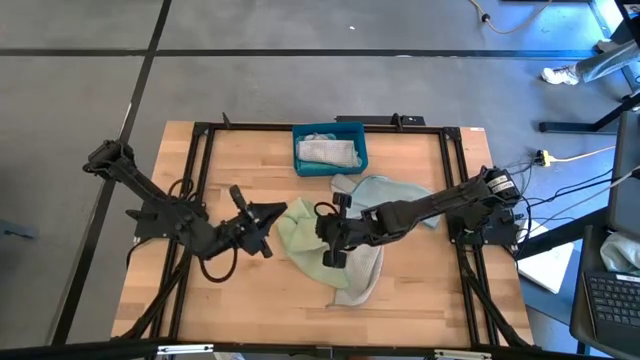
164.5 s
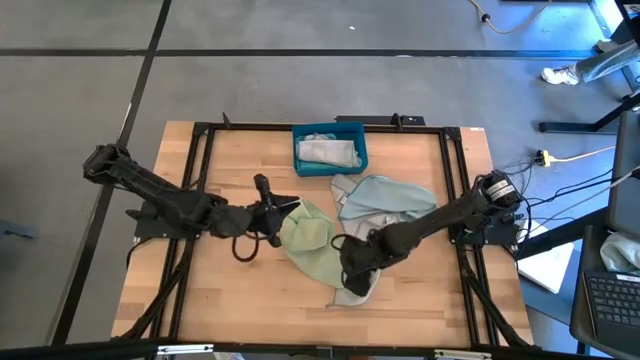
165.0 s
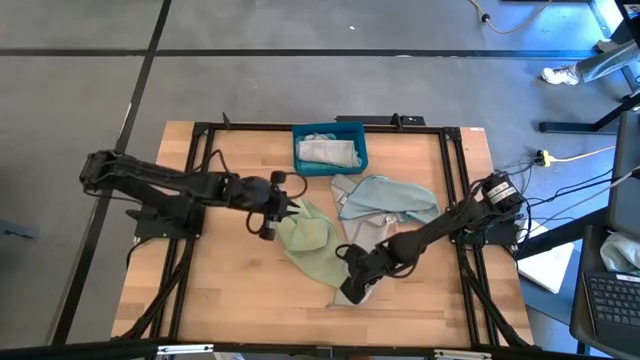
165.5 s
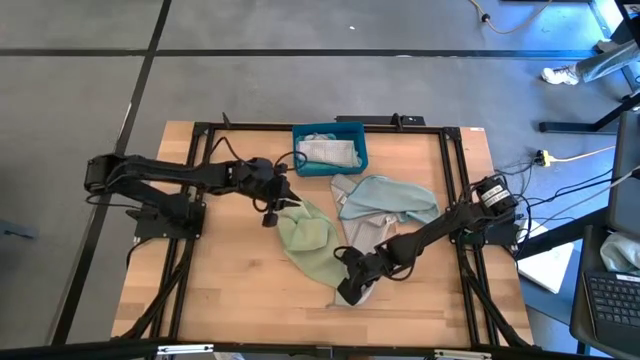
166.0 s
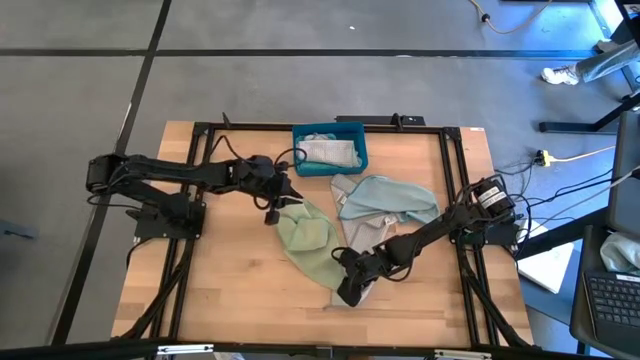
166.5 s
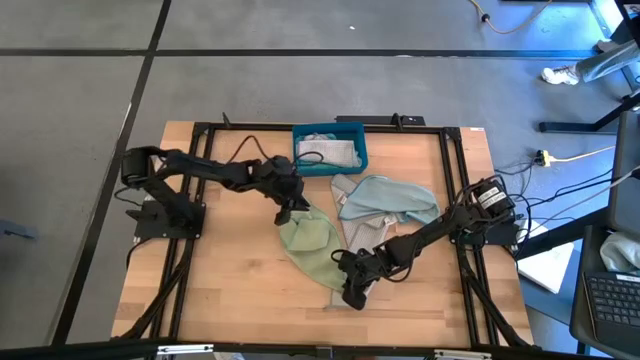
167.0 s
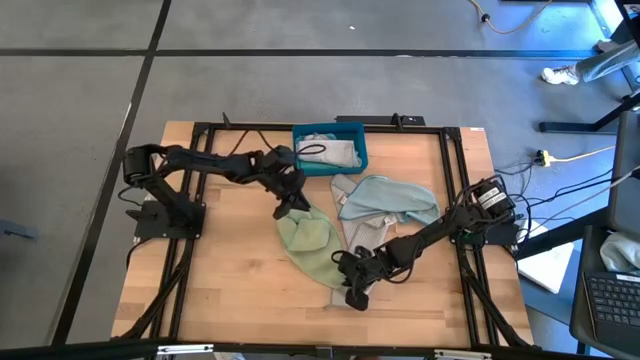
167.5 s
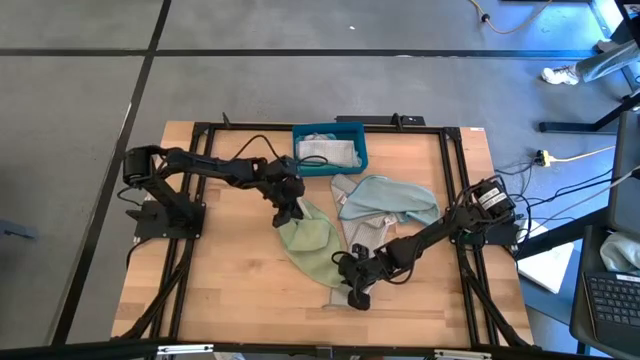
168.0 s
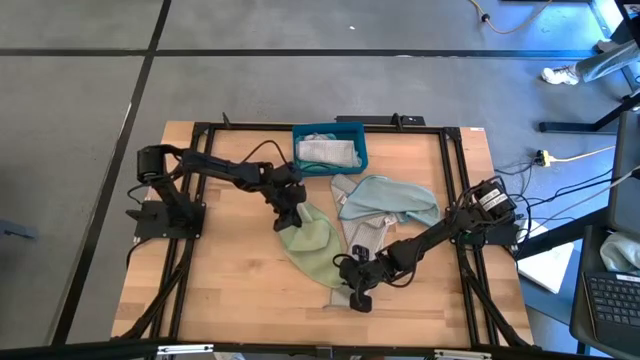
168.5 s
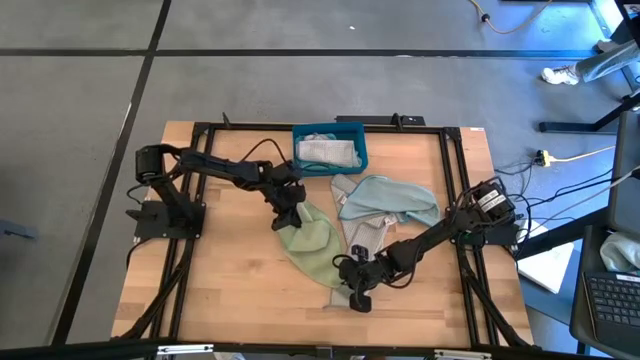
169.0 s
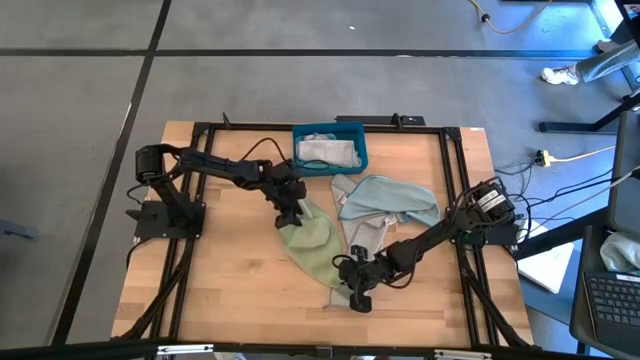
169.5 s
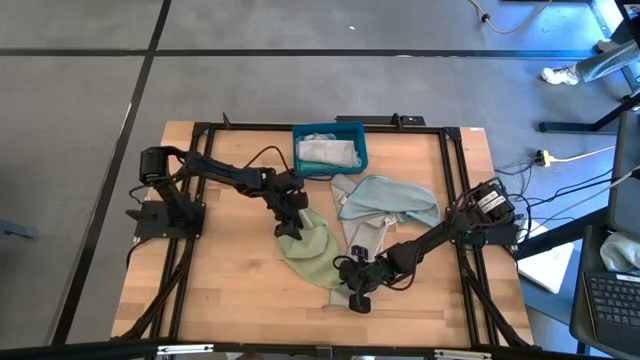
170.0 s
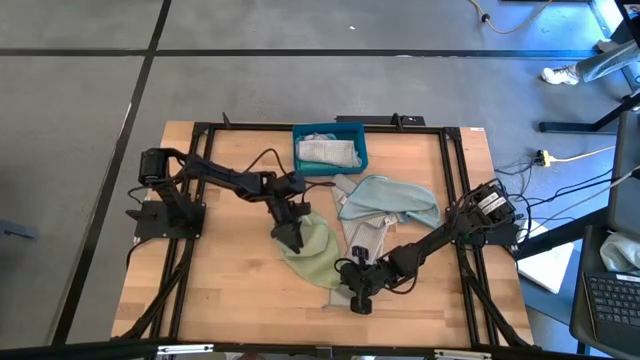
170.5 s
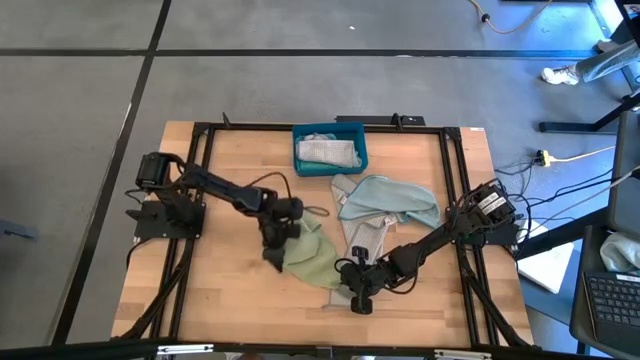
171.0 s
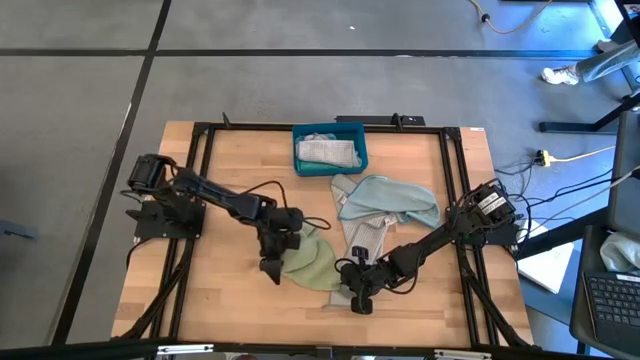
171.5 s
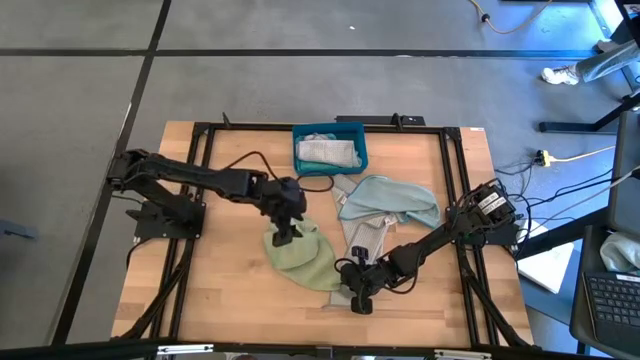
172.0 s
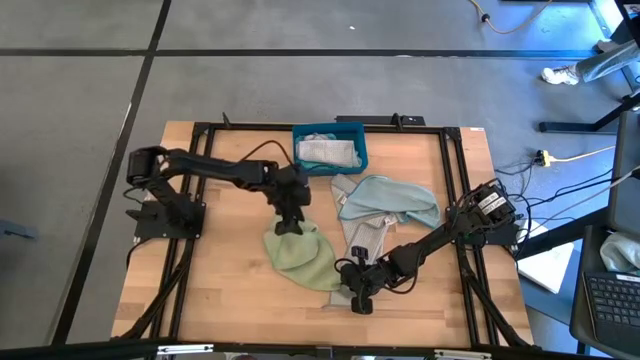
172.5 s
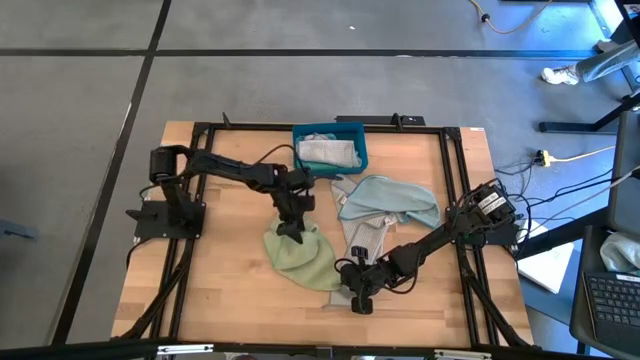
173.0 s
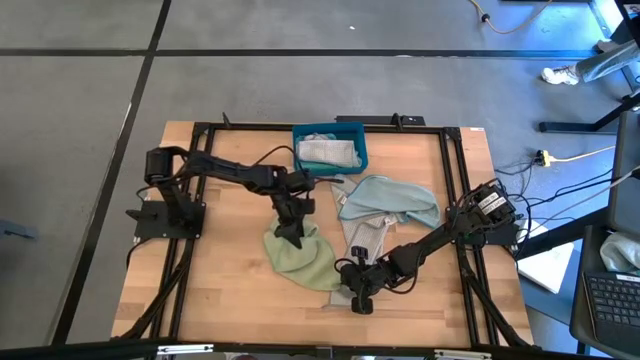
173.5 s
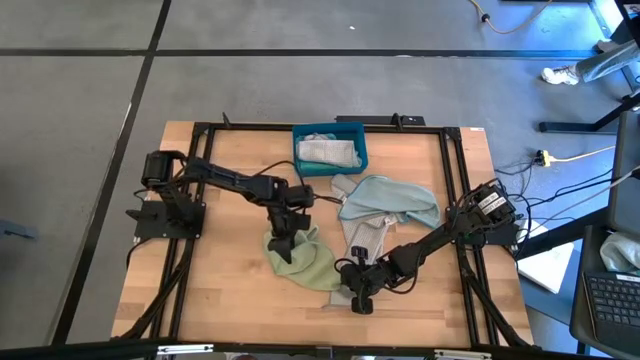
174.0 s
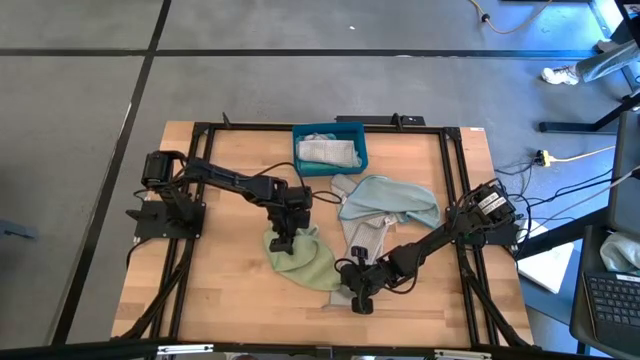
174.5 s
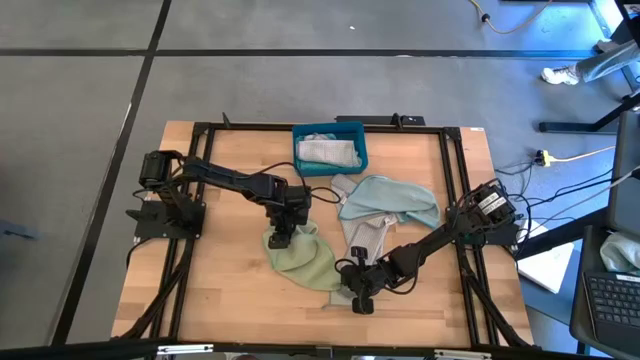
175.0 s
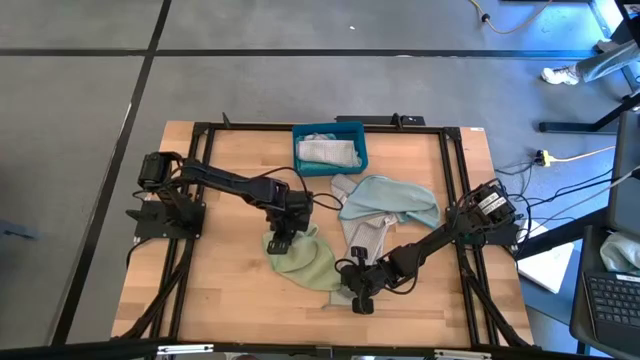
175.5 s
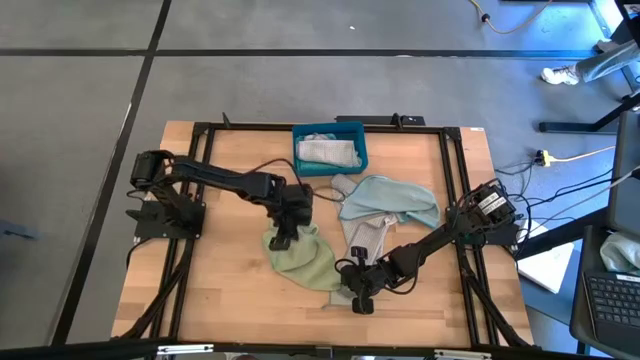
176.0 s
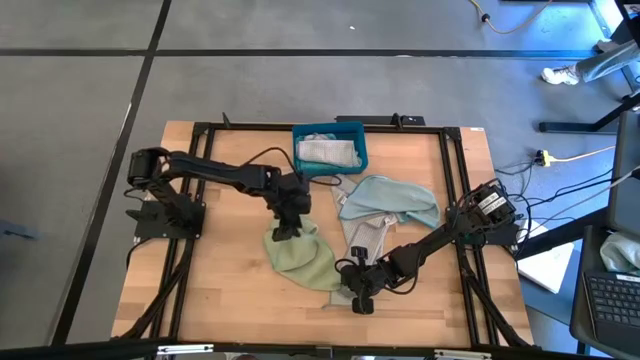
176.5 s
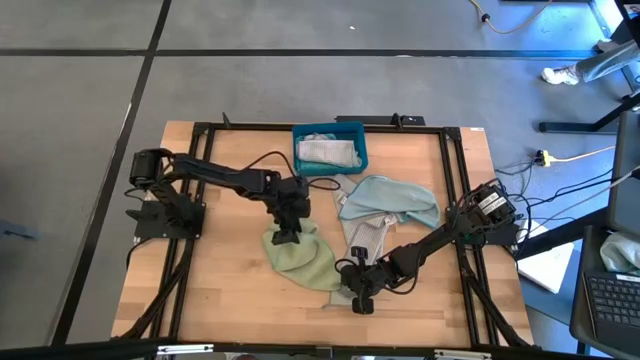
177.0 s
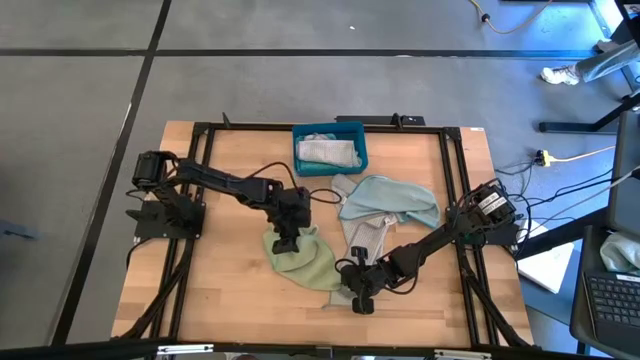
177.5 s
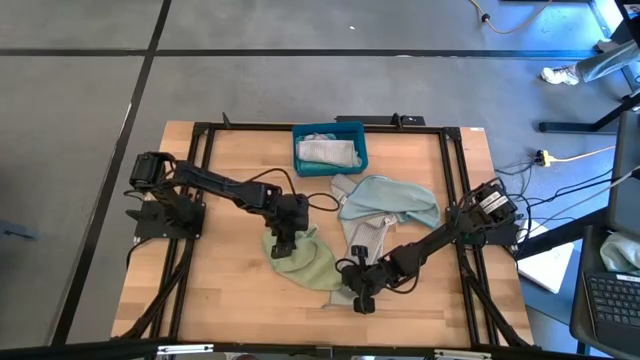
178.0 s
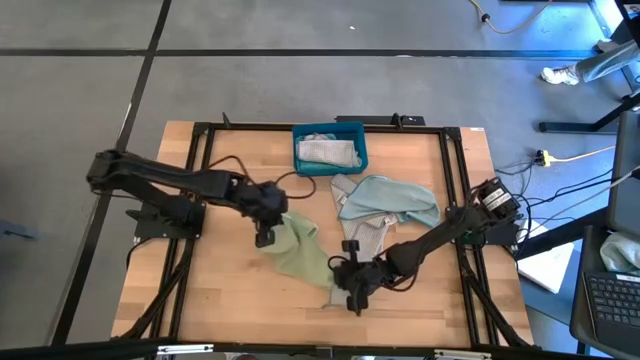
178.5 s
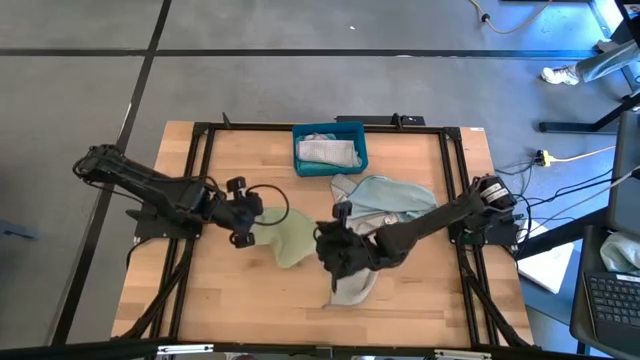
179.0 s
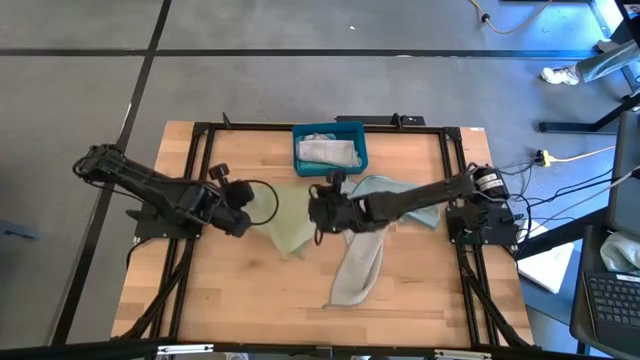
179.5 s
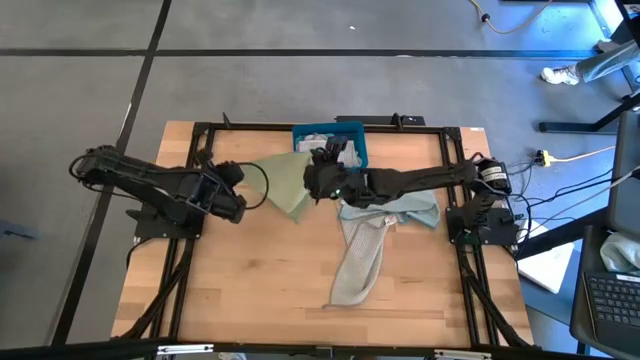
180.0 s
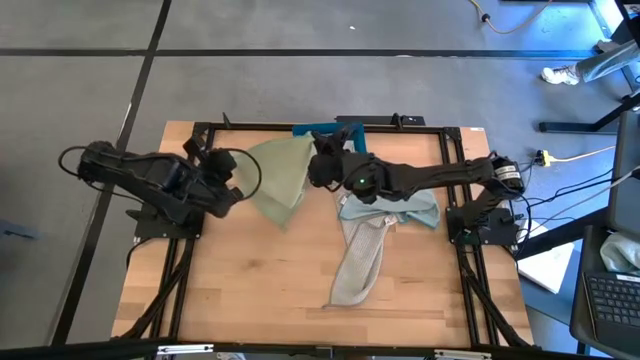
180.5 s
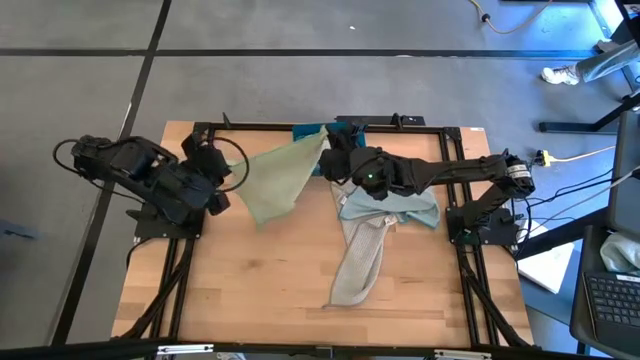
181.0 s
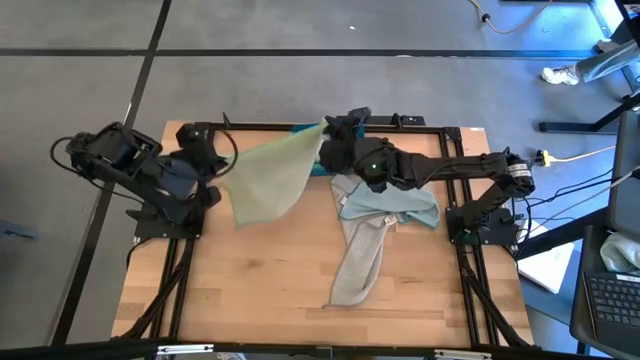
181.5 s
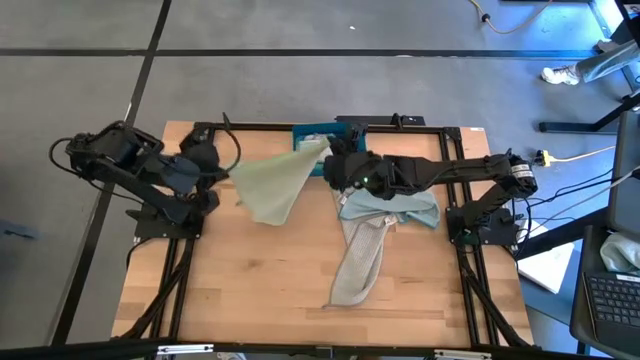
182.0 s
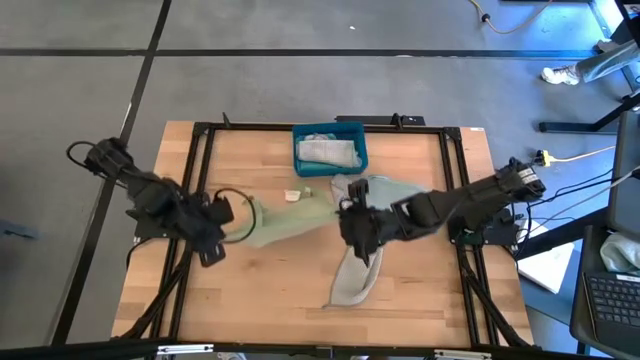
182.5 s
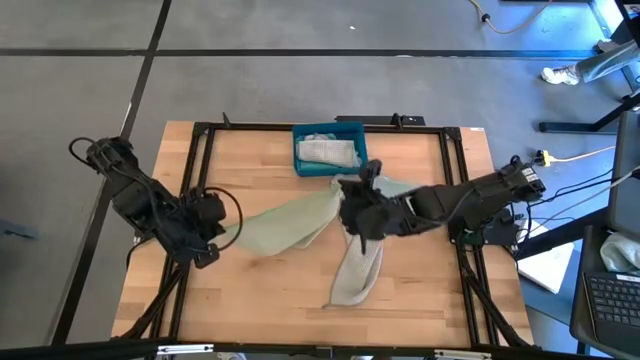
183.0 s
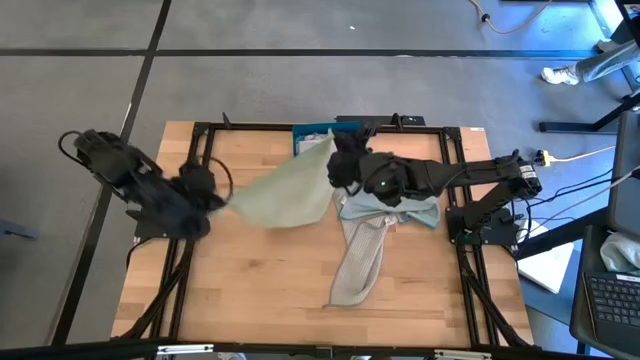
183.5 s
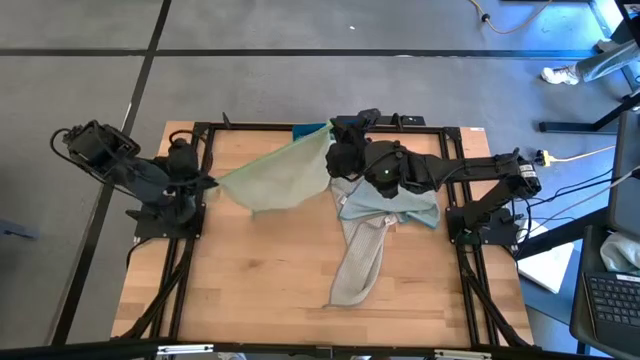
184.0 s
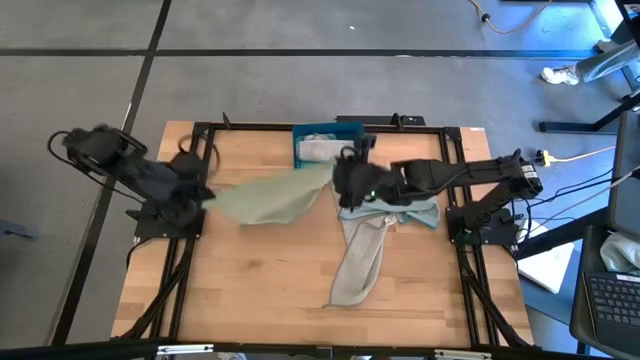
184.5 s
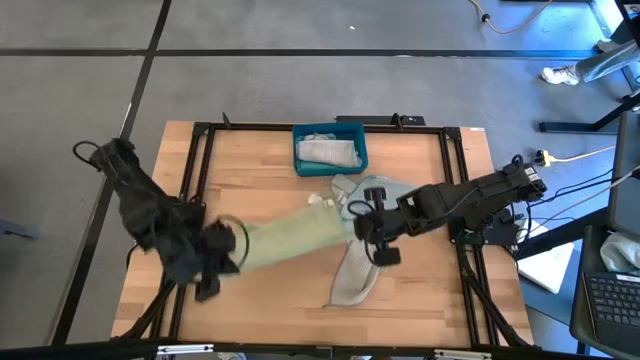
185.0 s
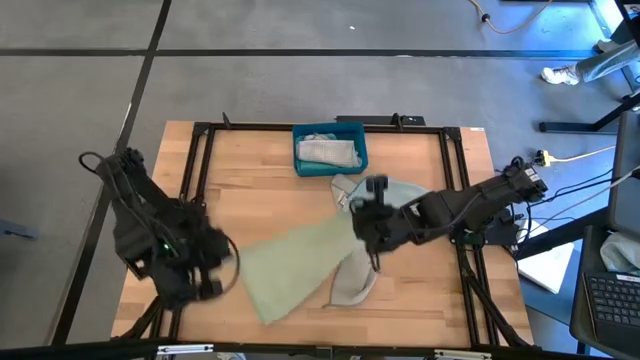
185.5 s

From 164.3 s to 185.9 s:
Task: Fold microfiber towels
Fold the green towel
